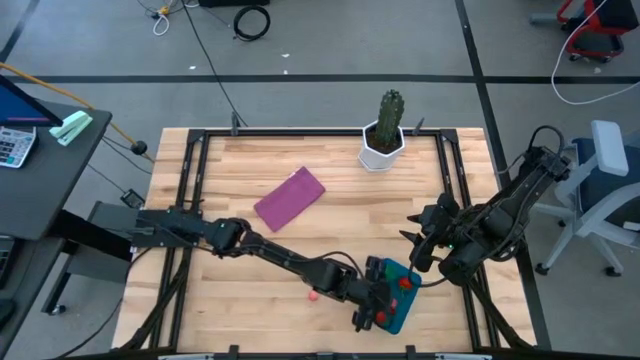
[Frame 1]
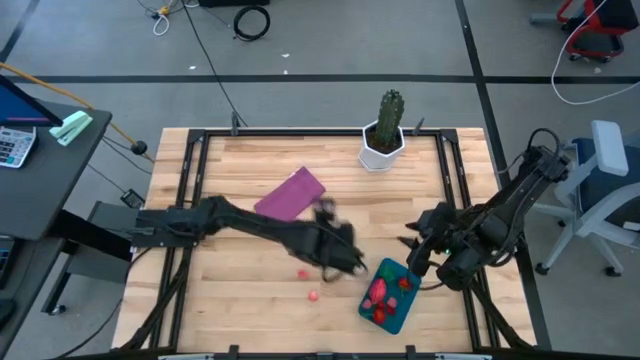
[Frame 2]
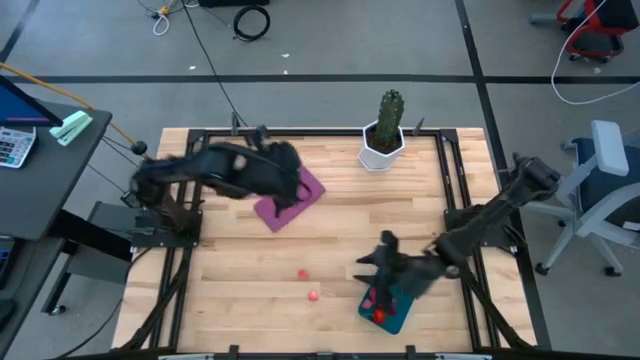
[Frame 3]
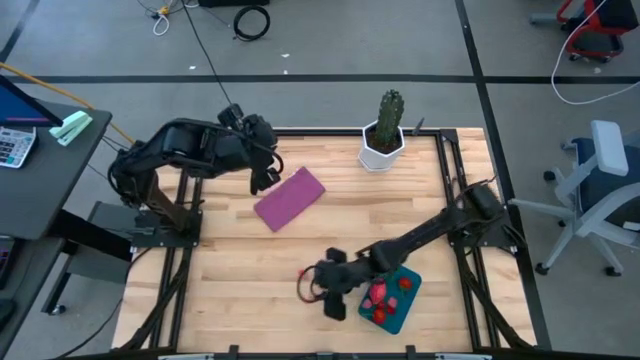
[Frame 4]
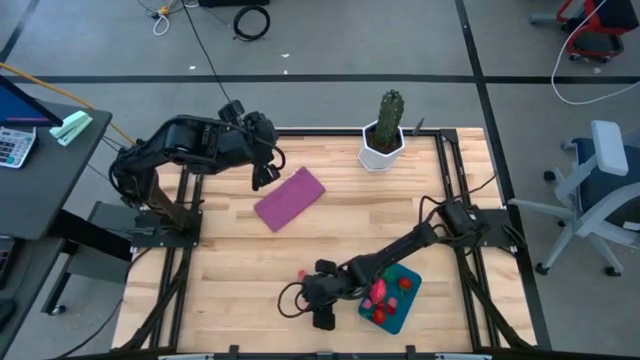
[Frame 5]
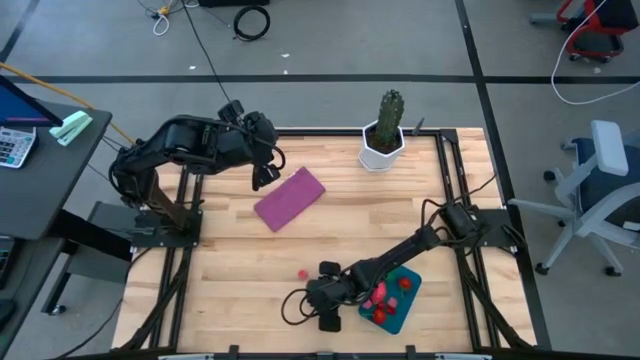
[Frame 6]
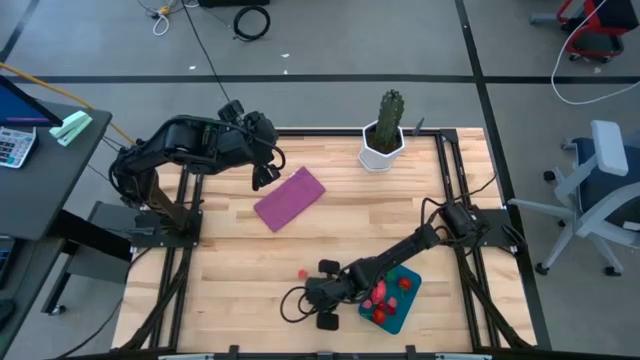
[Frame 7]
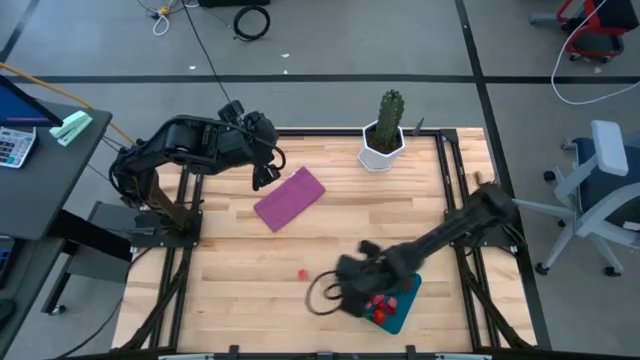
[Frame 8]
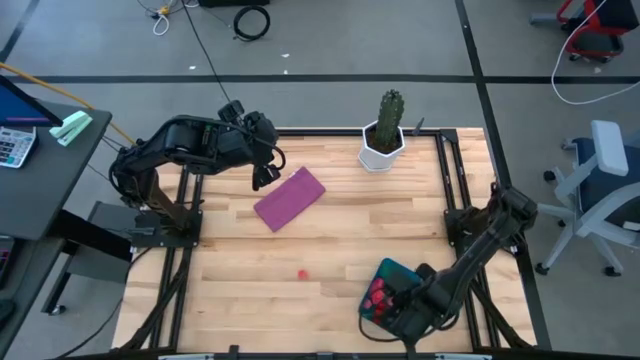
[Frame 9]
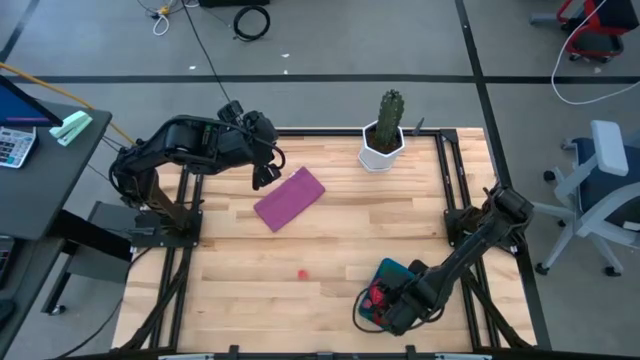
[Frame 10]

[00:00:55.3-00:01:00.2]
Task: Pick and placing Produce into tupperware
Put the peach into the blue bin

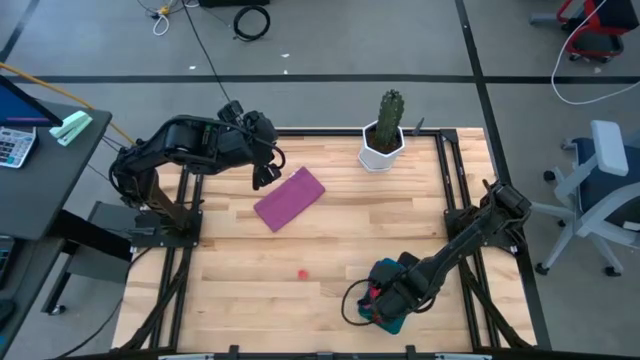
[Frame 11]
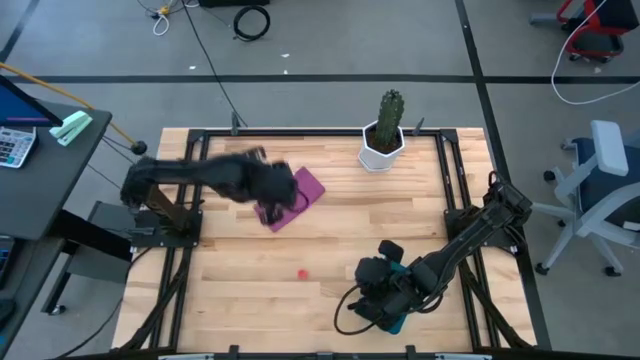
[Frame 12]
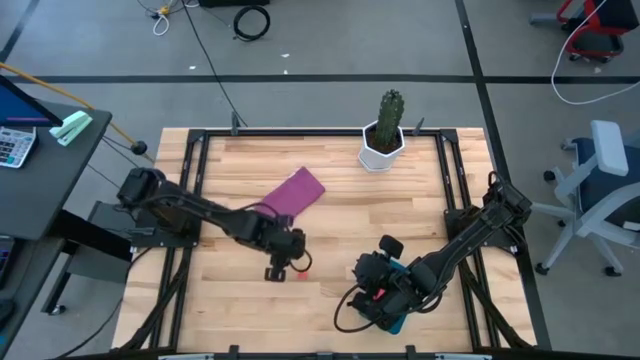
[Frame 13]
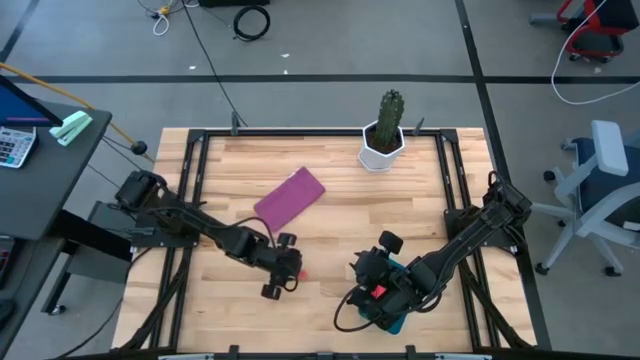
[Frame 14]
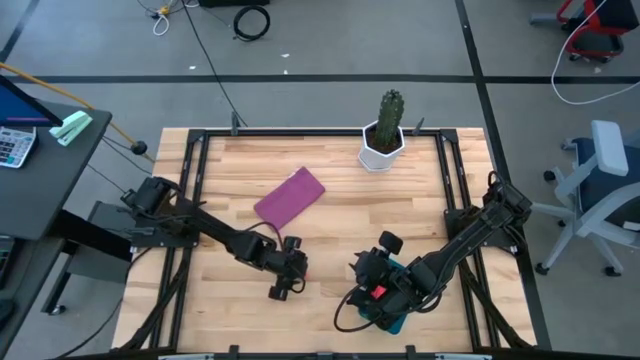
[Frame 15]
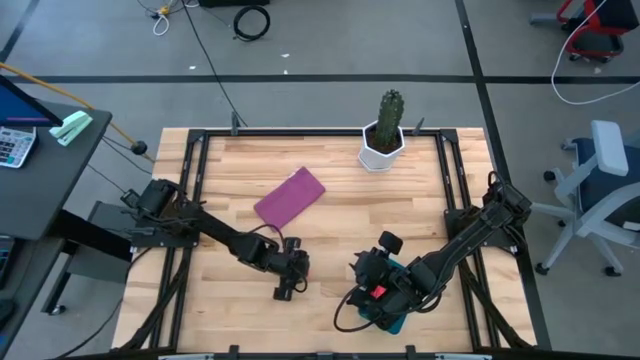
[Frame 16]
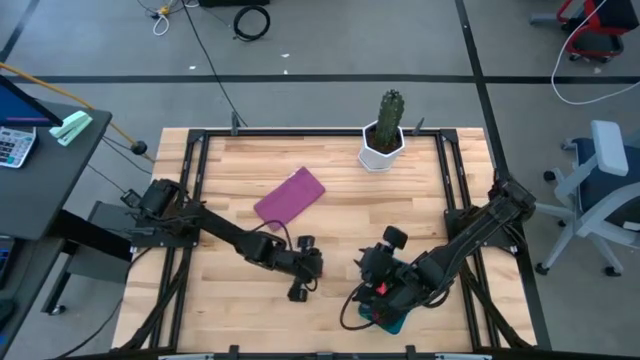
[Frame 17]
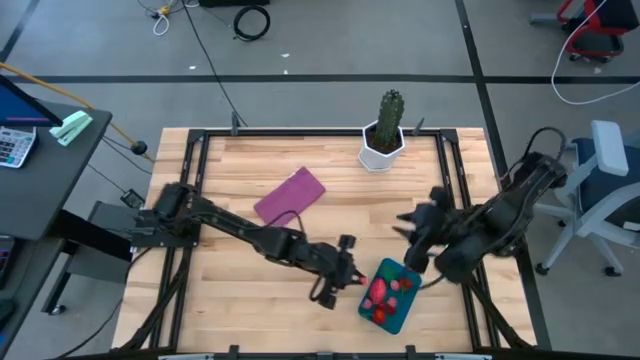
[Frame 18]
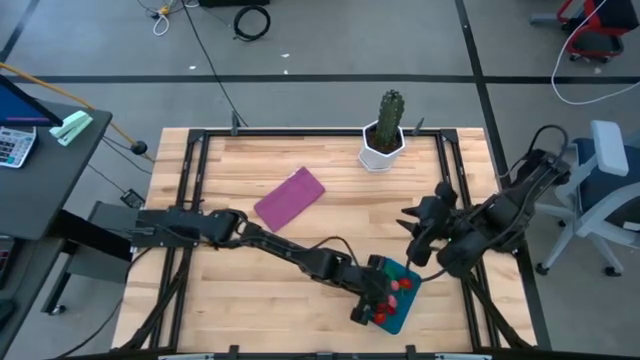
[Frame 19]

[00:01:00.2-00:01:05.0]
Put the peach into the blue bin

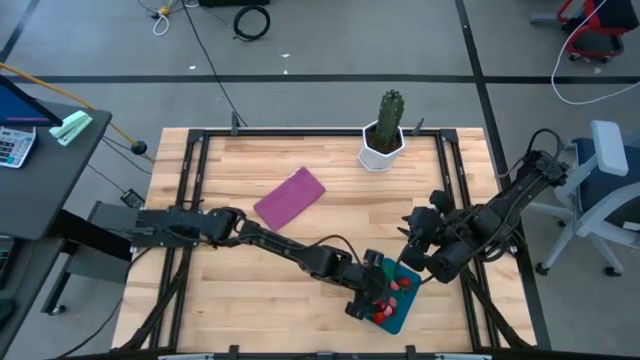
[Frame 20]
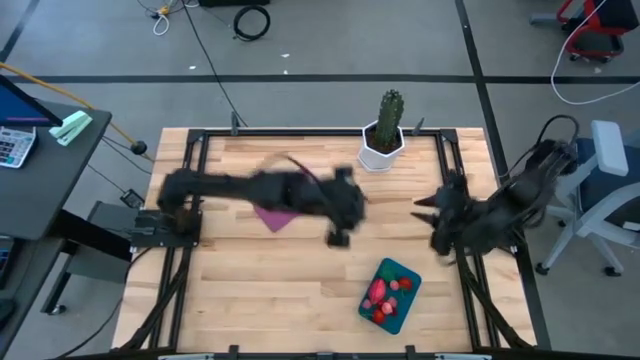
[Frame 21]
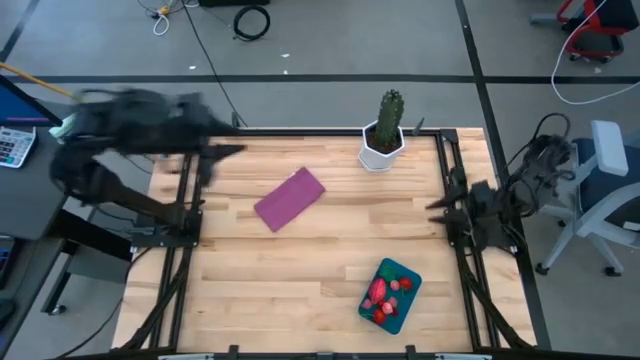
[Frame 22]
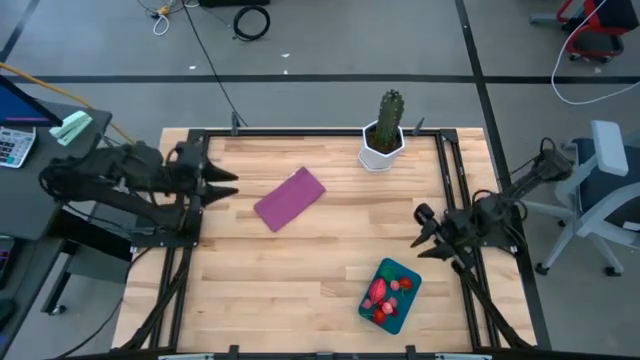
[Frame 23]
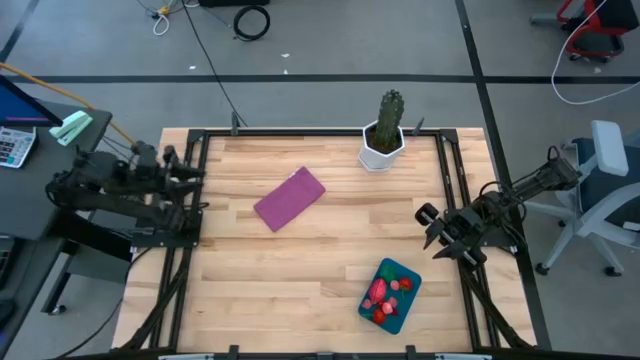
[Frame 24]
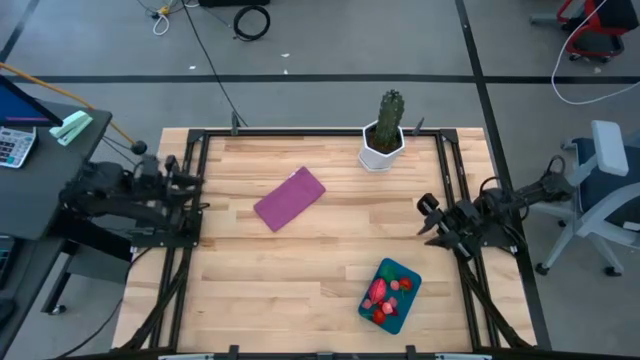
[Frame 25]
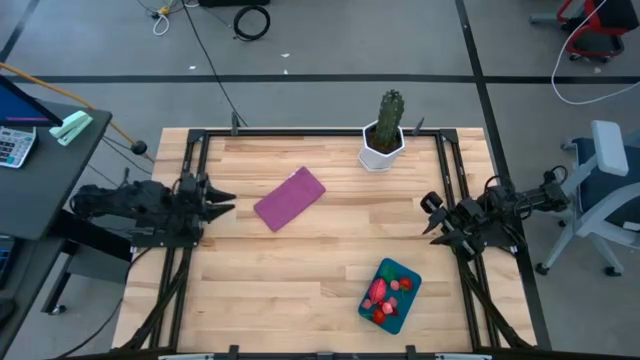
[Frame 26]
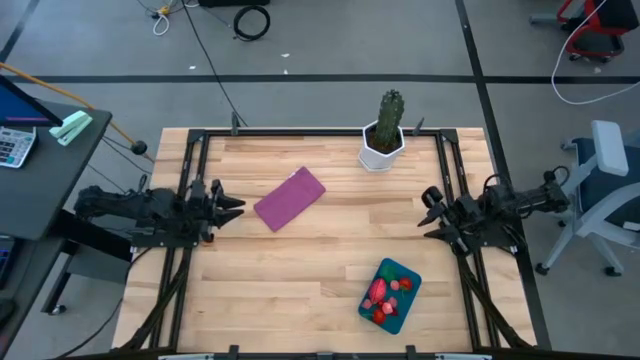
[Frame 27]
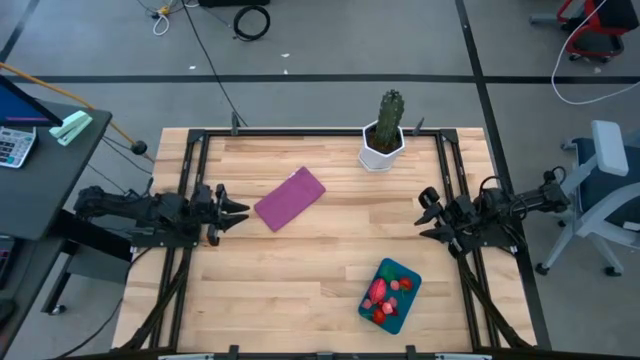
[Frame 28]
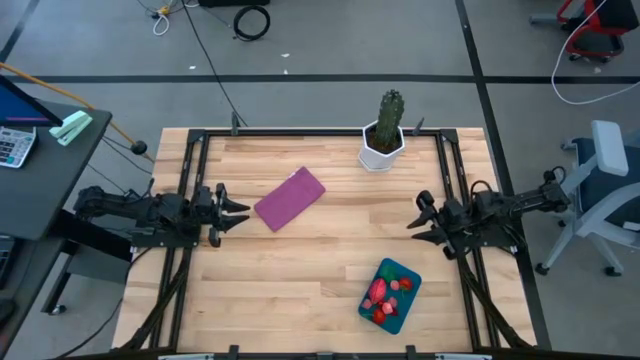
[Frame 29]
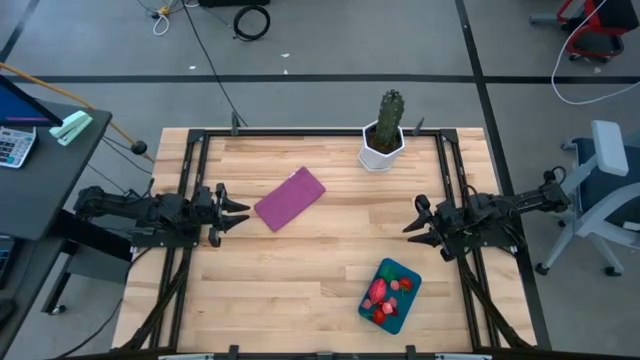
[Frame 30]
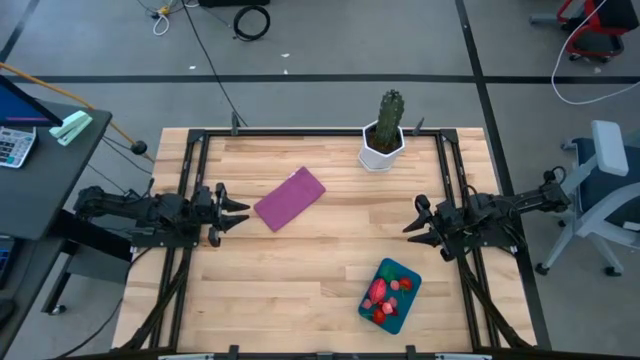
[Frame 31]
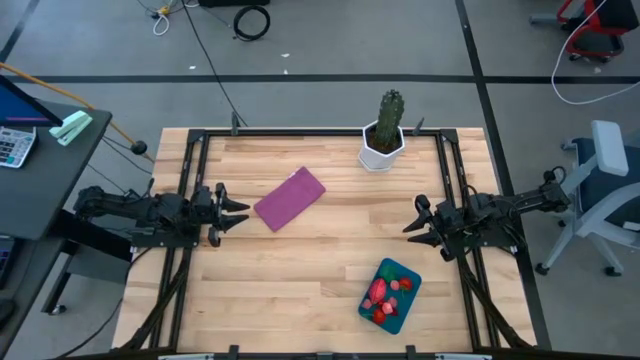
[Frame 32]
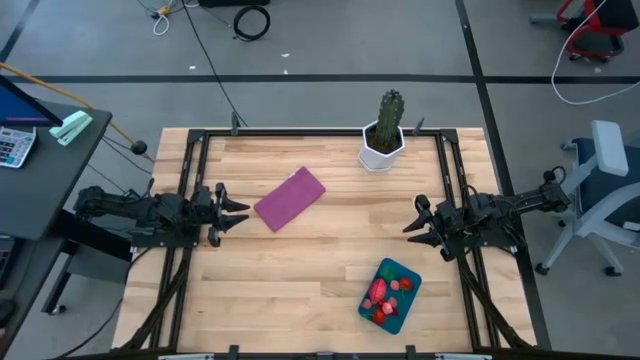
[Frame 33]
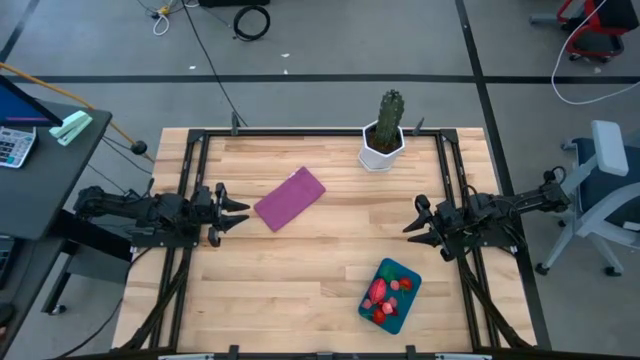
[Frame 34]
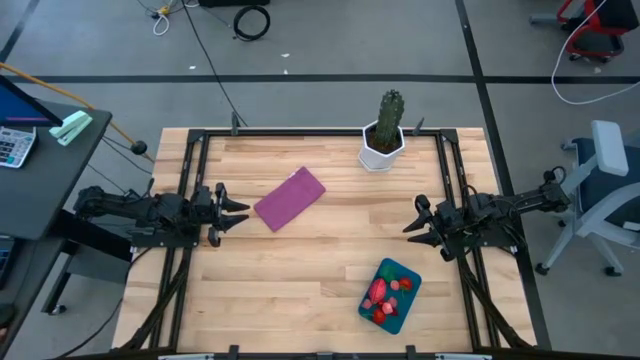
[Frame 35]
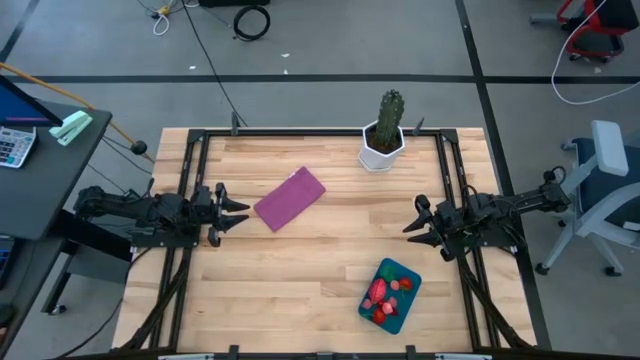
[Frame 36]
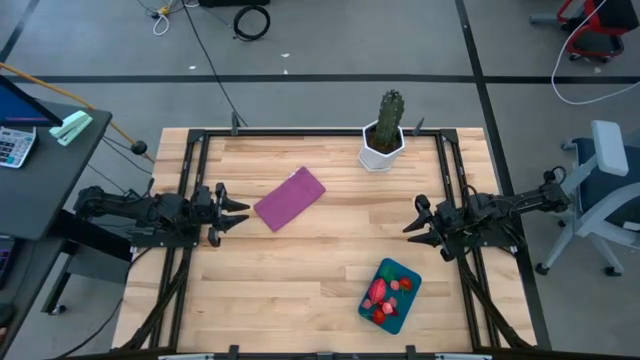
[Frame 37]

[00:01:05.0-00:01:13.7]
Return to Home Position

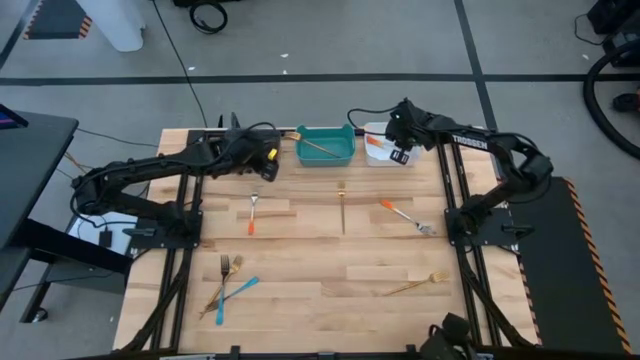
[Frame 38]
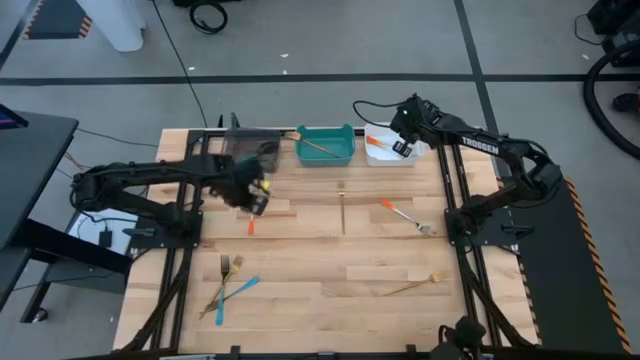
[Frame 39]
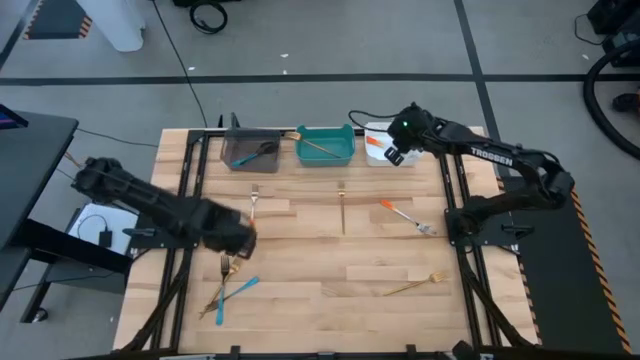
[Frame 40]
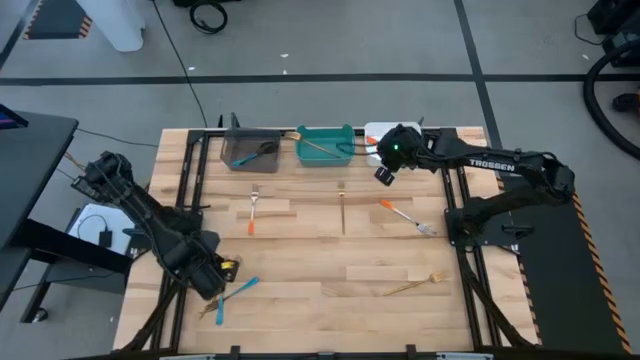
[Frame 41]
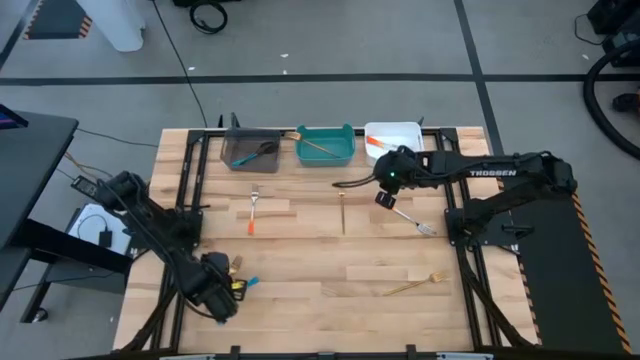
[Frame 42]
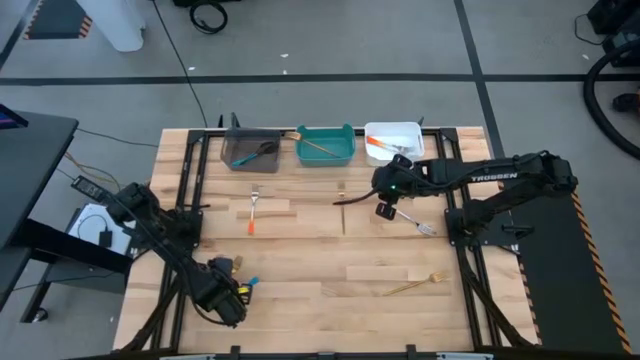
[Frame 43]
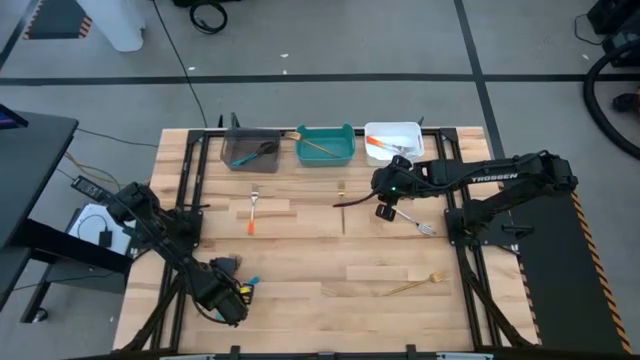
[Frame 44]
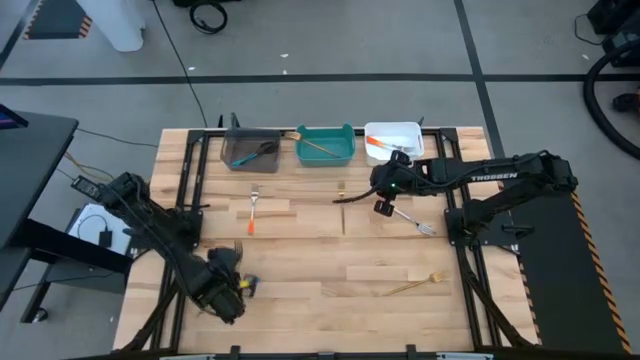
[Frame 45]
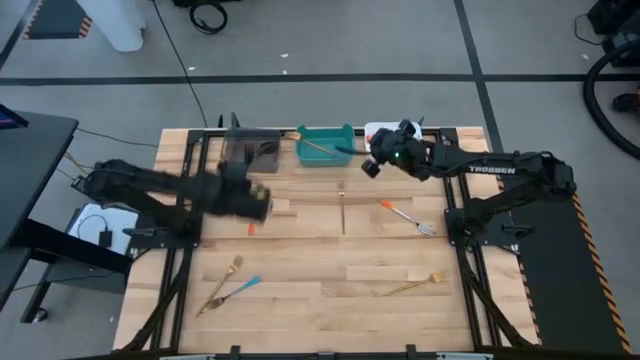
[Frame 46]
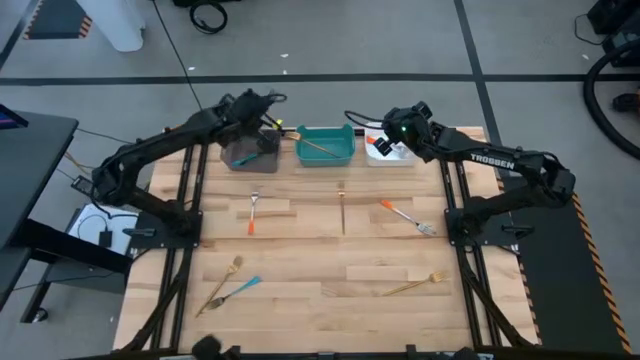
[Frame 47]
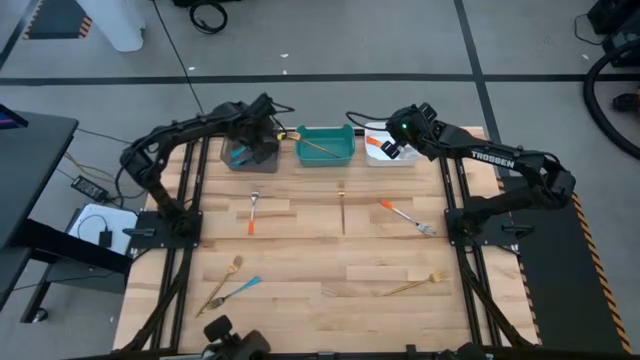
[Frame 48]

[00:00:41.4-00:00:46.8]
Task: Sort silverware by color (type)
Put the blue fork into the black transparent bin
